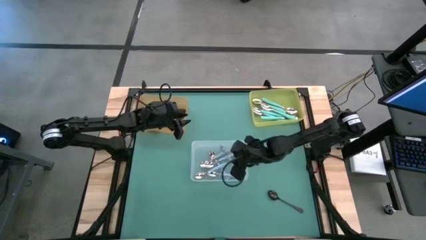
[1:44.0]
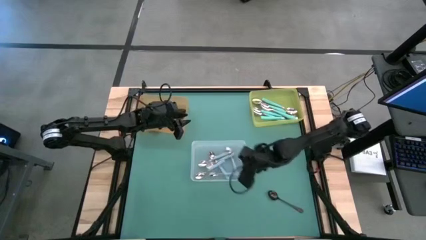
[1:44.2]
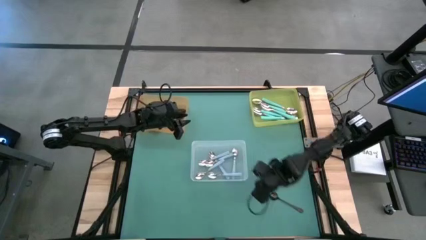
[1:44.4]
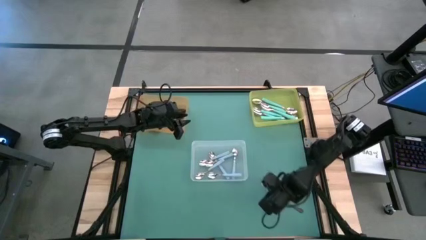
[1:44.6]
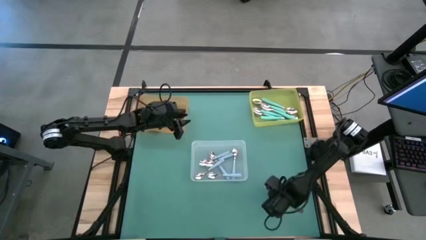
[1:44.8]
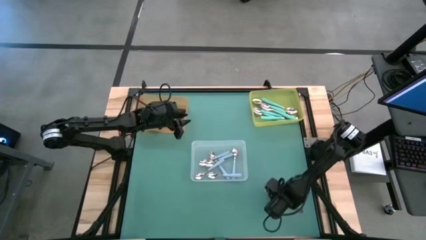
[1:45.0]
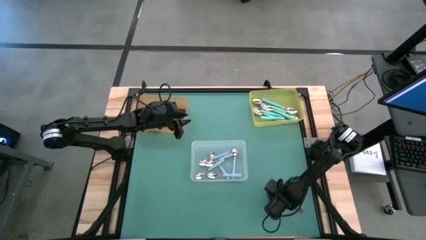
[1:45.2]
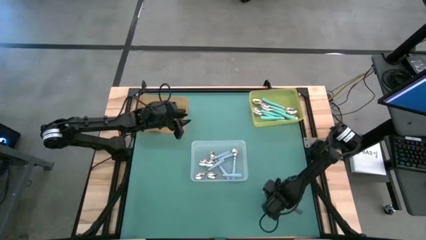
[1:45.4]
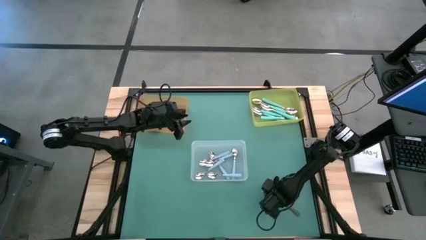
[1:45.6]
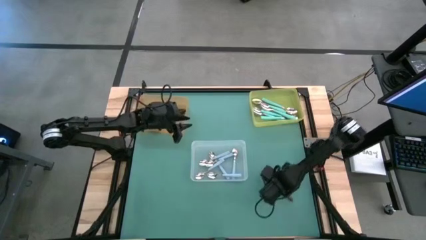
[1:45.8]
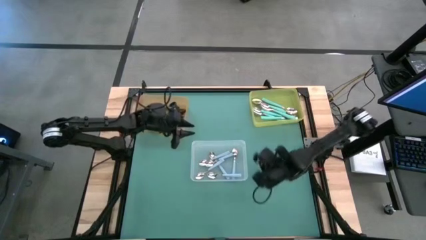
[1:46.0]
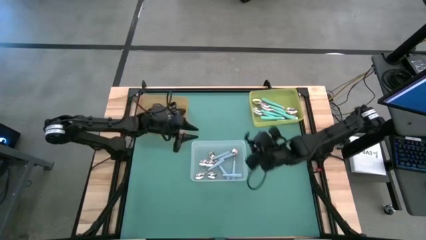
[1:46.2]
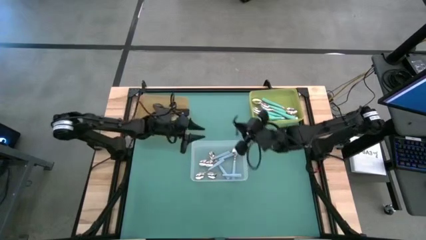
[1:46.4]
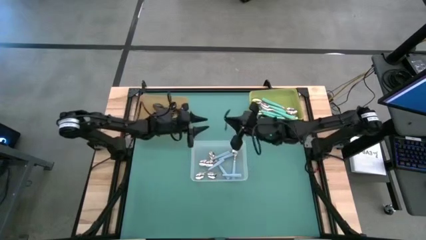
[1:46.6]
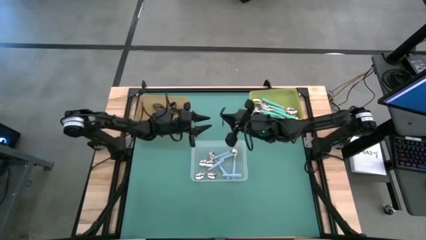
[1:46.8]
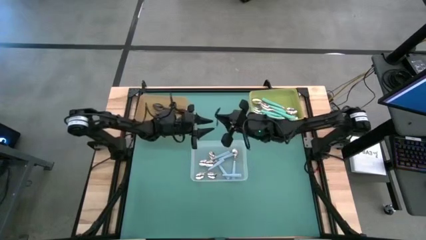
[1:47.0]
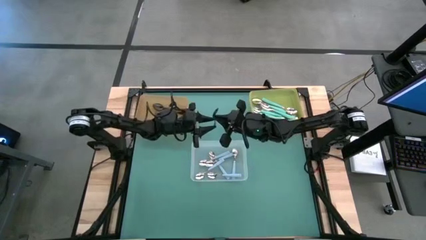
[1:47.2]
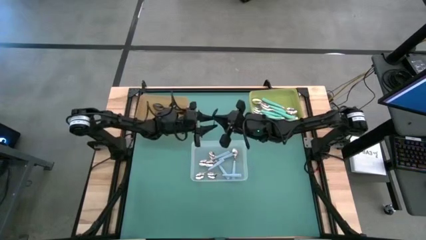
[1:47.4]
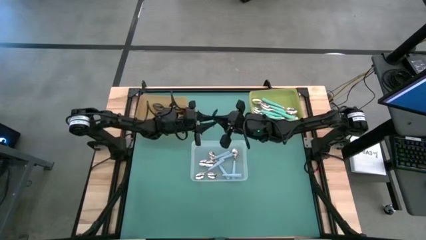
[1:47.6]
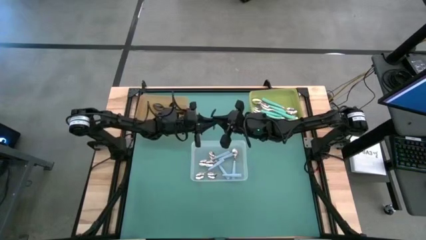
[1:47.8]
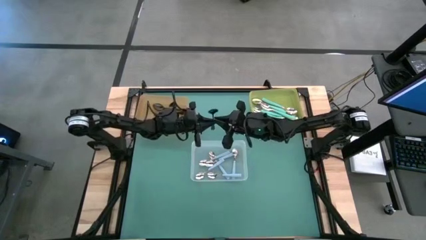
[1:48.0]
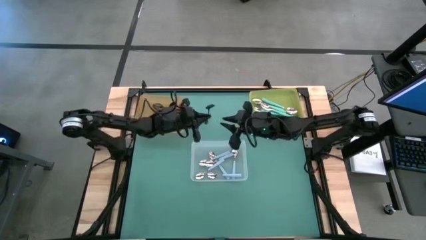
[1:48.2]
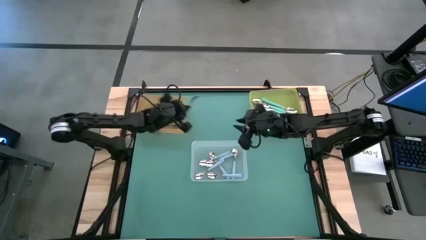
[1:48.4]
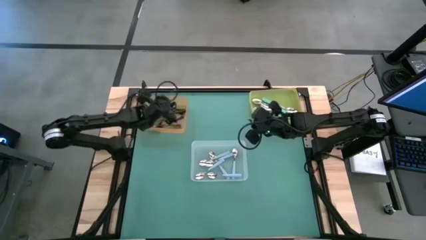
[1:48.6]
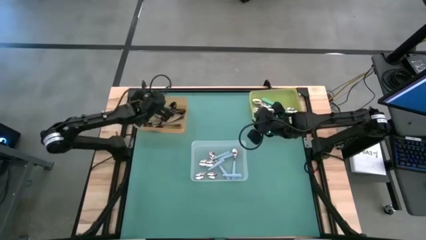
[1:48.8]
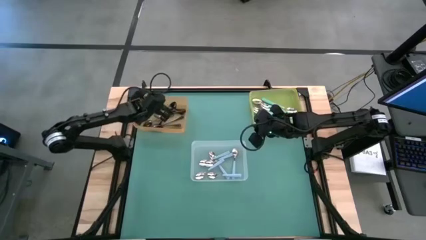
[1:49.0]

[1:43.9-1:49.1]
Task: Sort silverware by color (type)
Put the black spoon into the orange bin

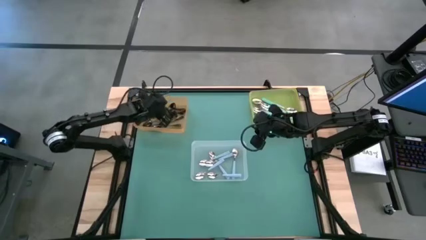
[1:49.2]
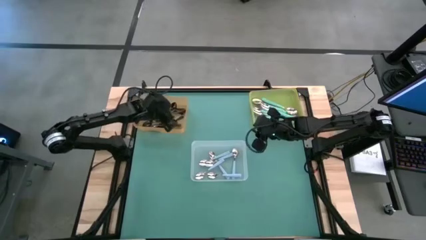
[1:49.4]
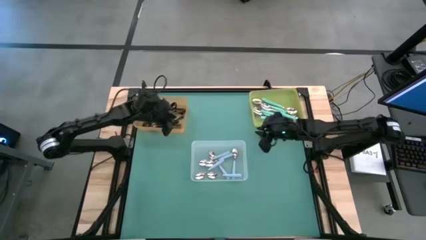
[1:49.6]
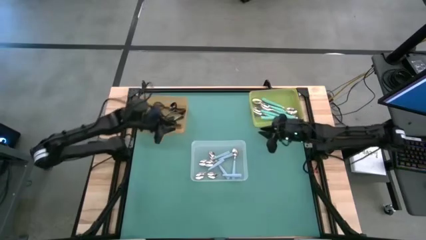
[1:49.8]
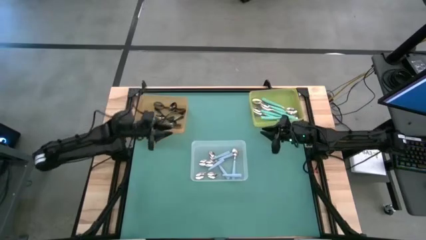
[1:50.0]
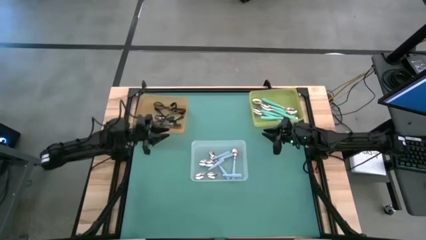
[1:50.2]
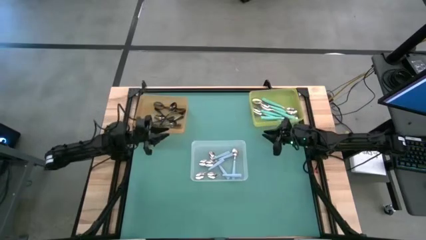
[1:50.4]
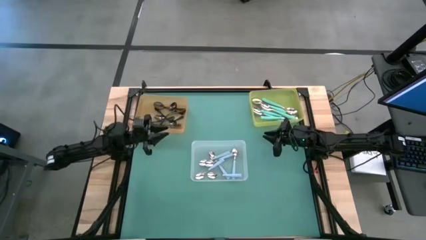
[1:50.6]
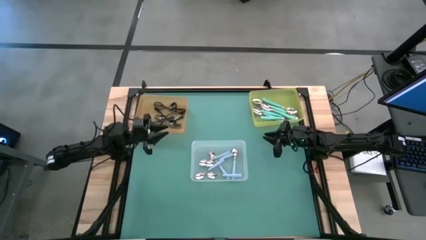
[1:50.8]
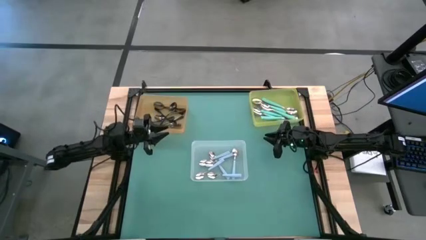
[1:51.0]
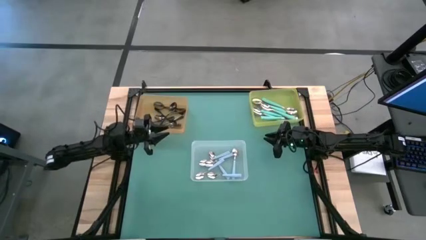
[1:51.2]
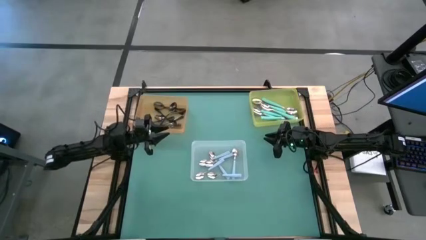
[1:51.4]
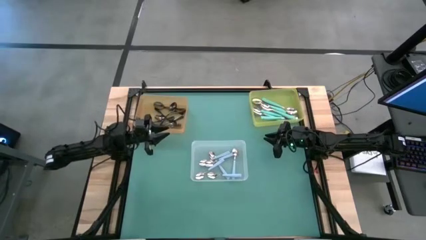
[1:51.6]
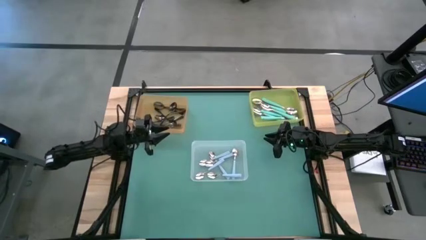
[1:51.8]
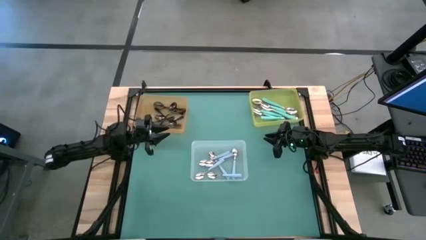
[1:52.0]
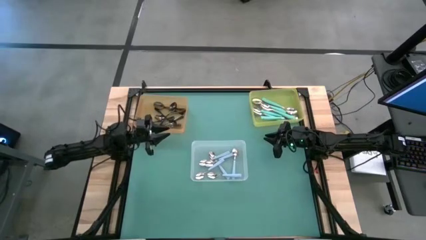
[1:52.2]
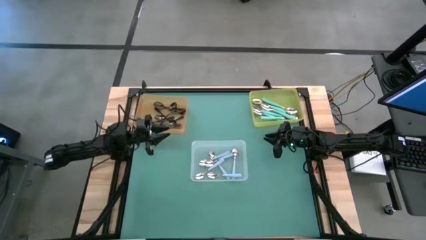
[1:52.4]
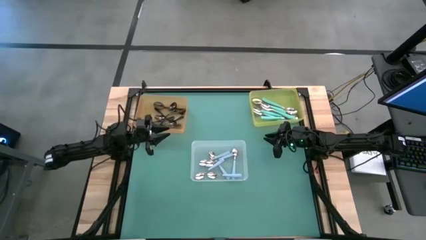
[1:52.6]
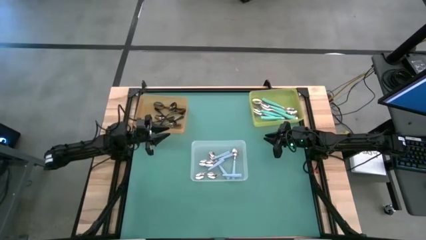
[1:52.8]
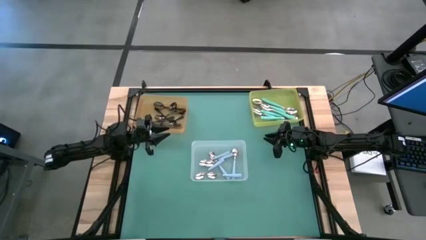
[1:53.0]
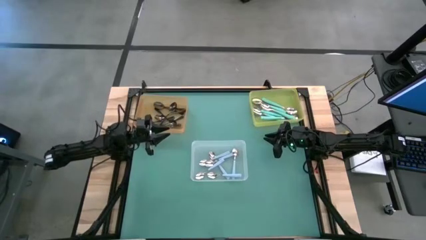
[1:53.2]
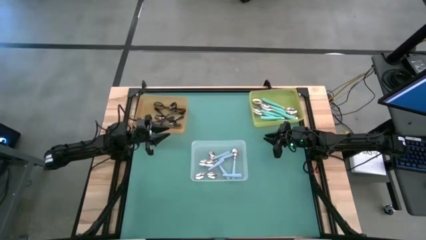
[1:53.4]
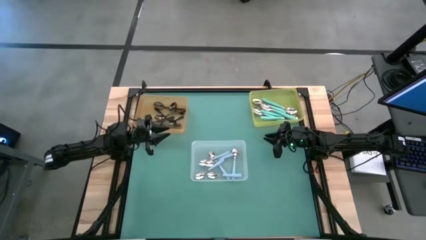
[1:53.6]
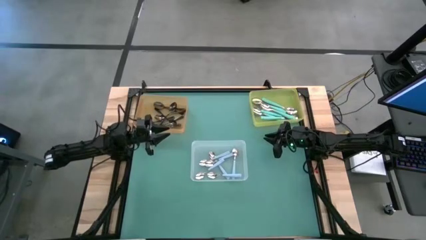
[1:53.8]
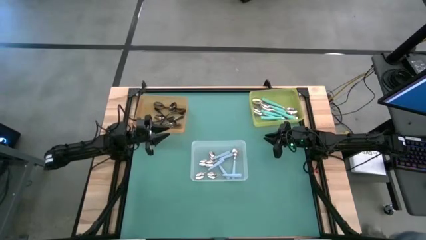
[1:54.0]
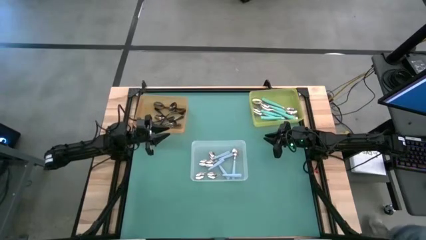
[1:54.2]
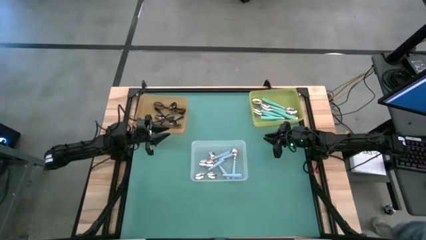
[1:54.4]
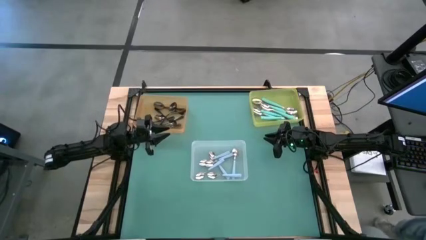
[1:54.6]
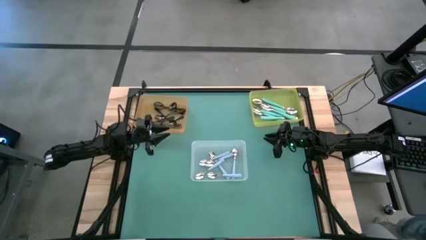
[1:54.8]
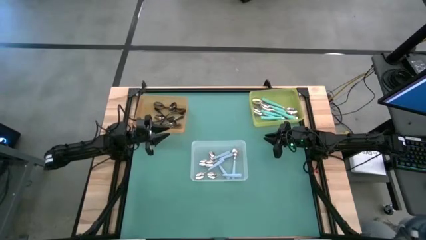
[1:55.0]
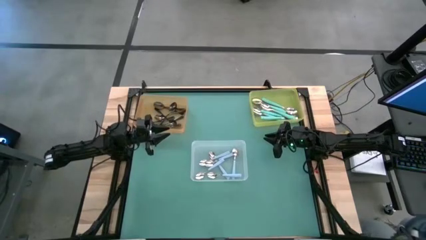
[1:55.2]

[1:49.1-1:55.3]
Return to Home Position

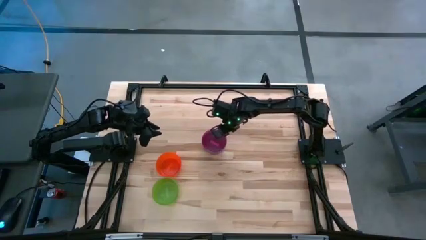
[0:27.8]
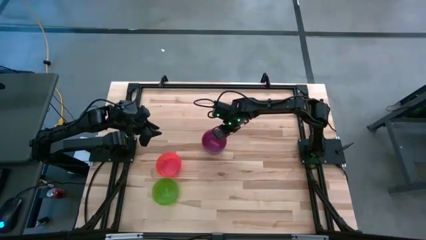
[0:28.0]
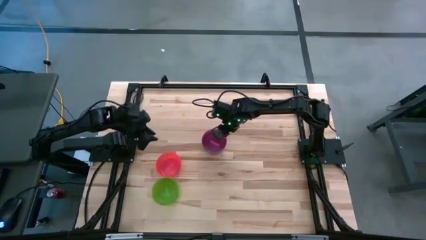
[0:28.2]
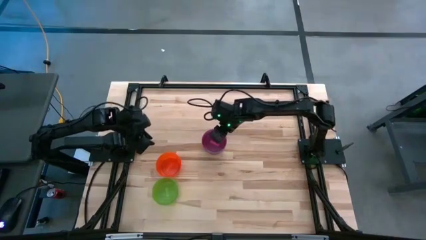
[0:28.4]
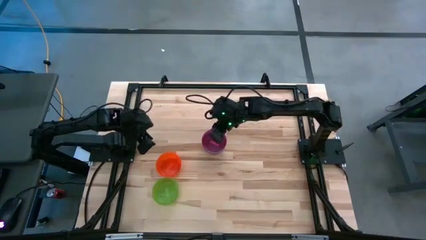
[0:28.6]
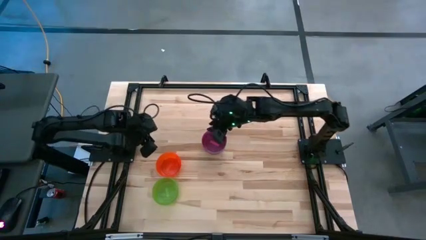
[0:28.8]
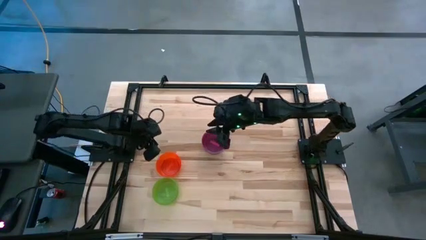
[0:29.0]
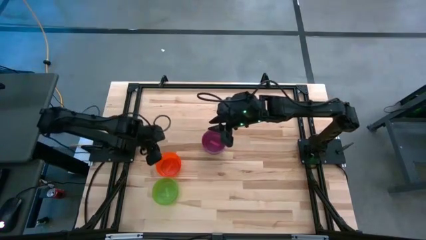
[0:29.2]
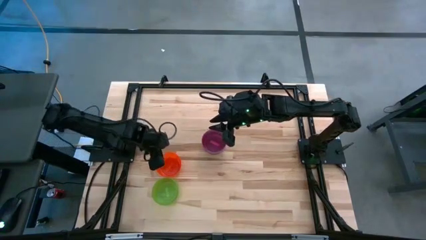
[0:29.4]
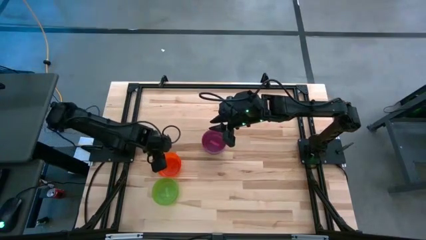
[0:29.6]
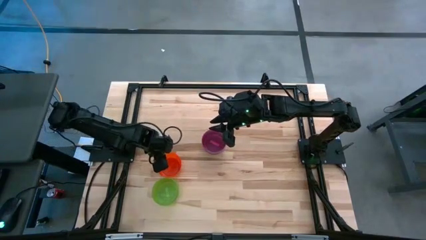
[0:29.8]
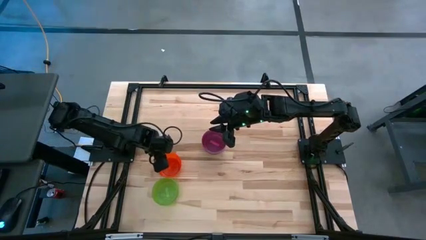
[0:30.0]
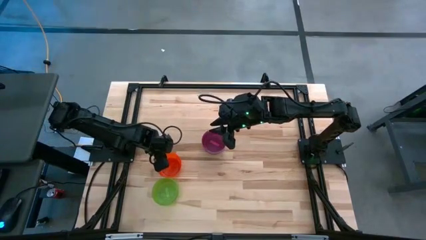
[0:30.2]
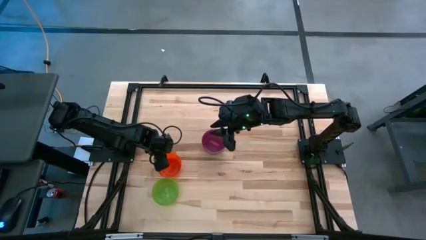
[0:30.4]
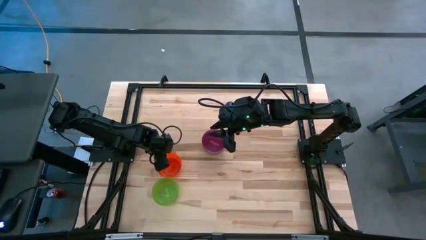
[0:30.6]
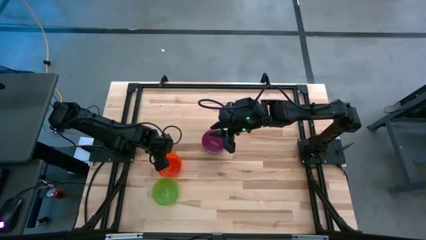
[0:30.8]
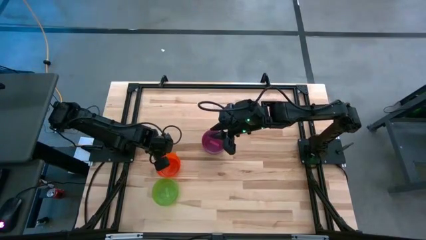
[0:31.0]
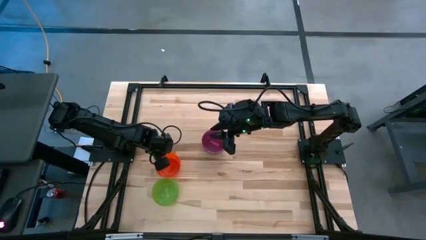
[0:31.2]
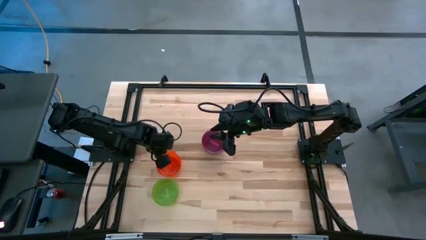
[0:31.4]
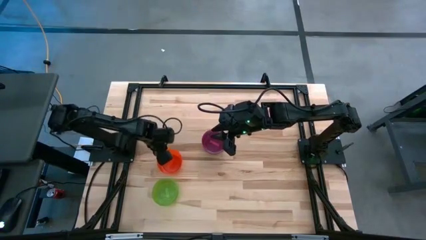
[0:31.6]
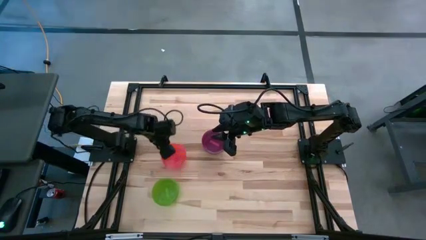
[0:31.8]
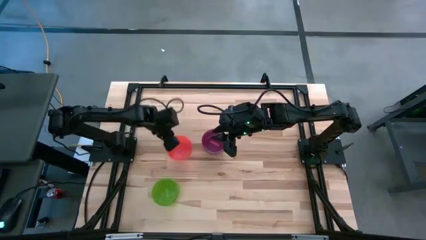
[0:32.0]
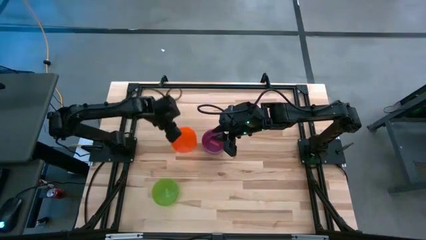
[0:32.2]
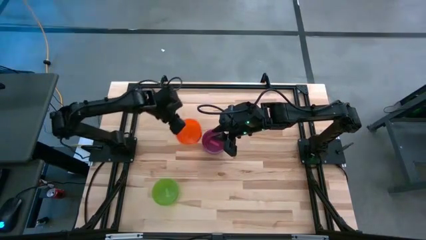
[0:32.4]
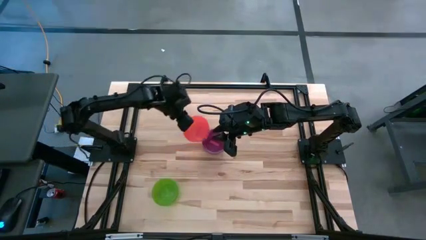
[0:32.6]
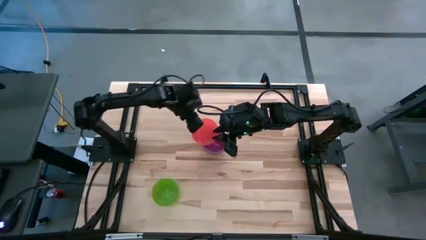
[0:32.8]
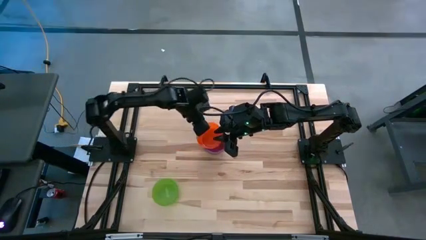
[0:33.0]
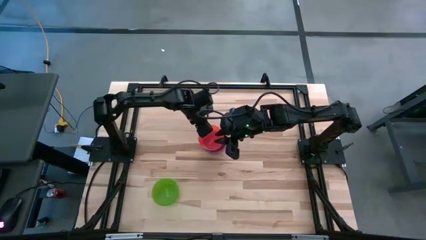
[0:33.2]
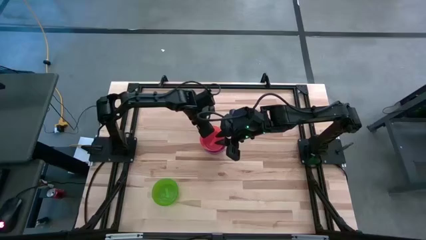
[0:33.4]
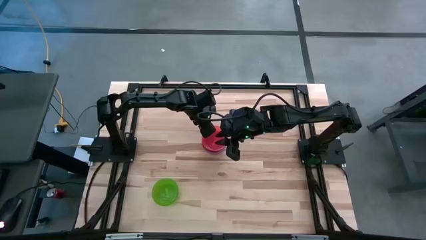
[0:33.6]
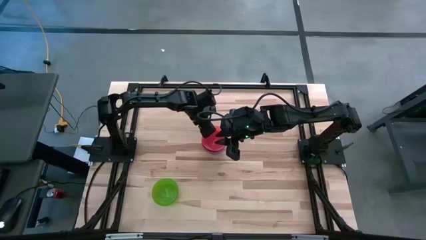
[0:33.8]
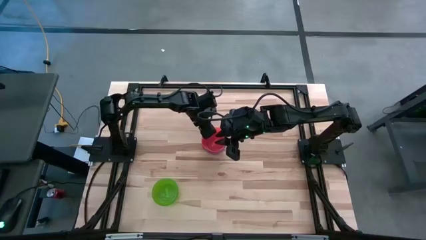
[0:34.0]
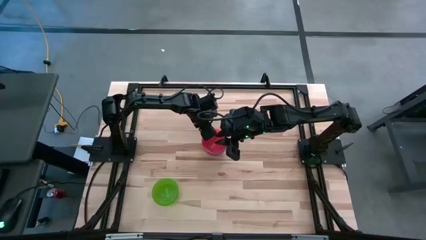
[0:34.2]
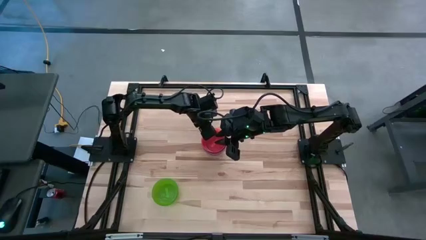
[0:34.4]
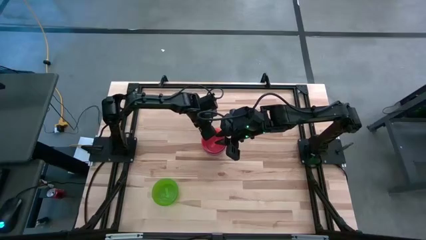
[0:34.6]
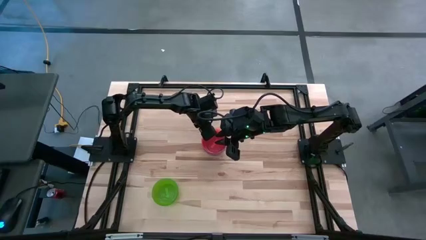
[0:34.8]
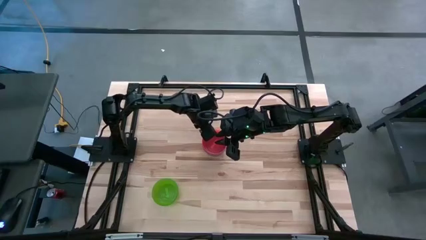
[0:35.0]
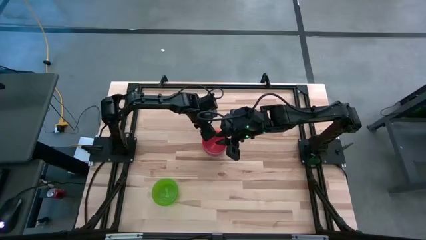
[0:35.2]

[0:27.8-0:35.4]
Task: Nest bowls inside each other
Stack the orange bowl on top of the pink bowl
